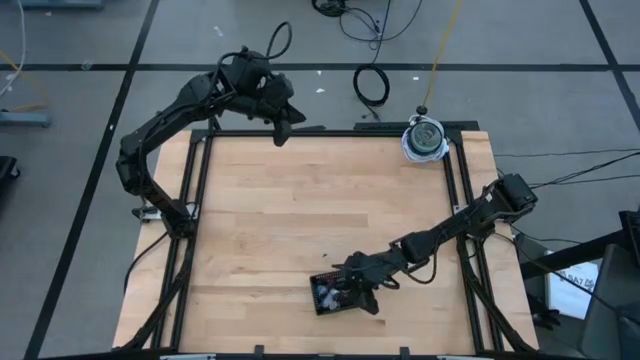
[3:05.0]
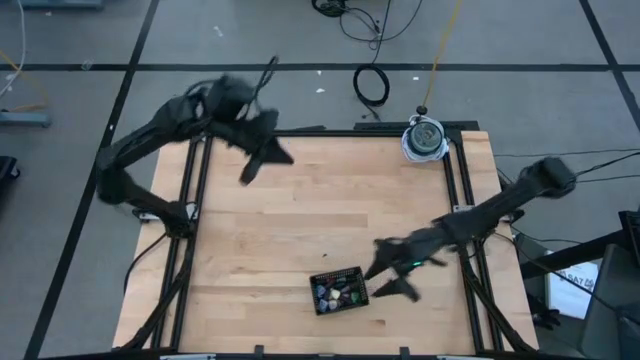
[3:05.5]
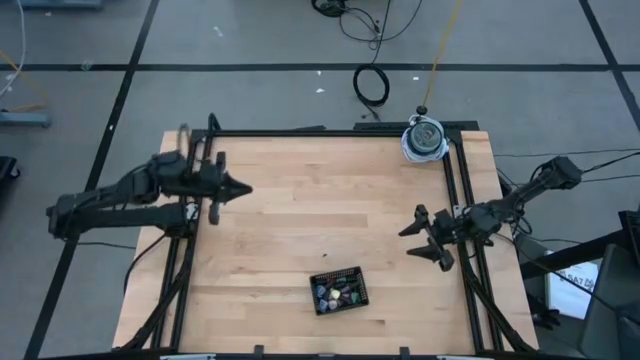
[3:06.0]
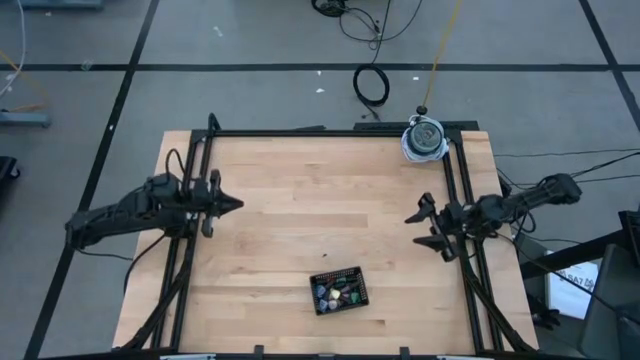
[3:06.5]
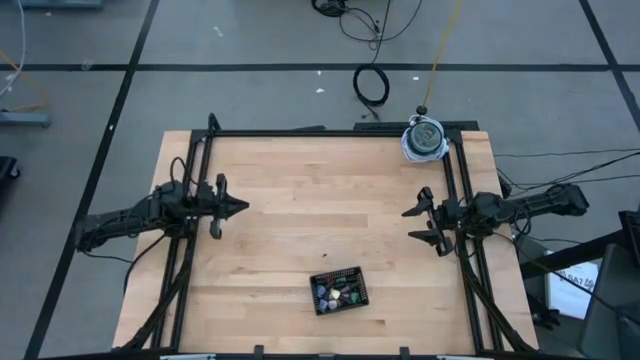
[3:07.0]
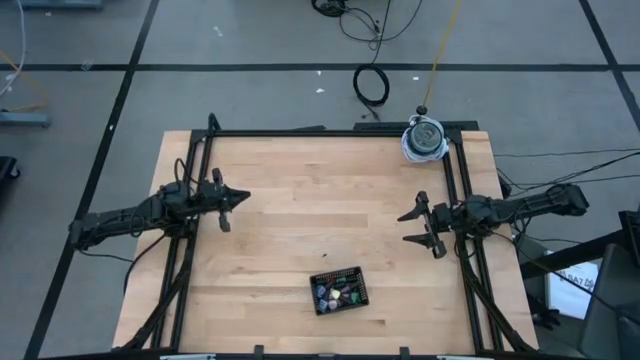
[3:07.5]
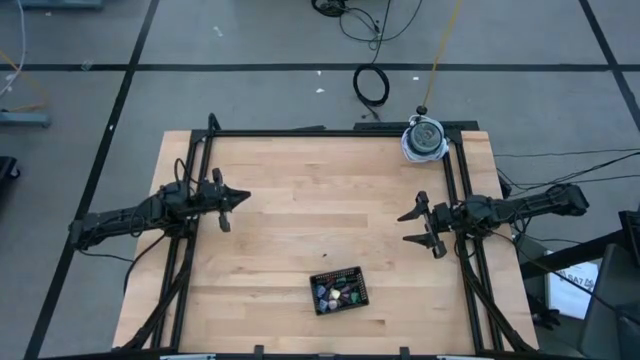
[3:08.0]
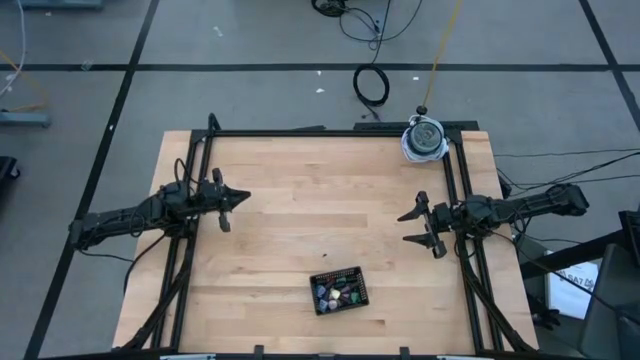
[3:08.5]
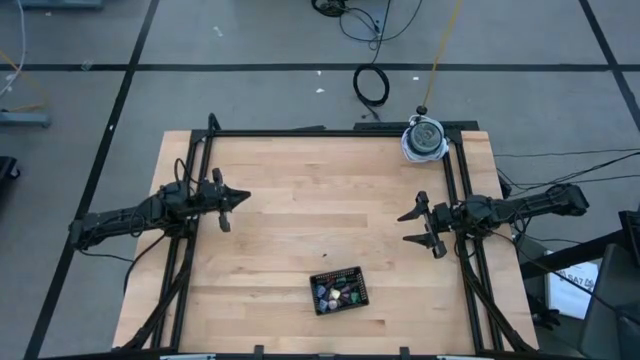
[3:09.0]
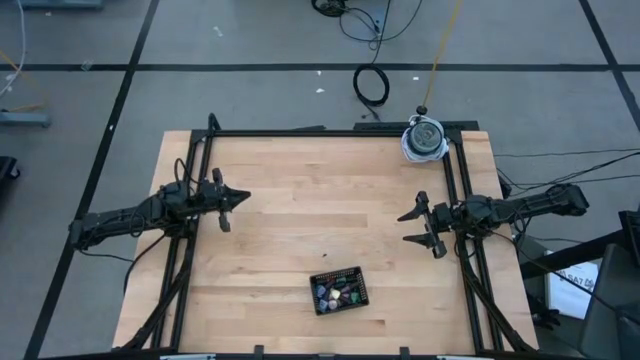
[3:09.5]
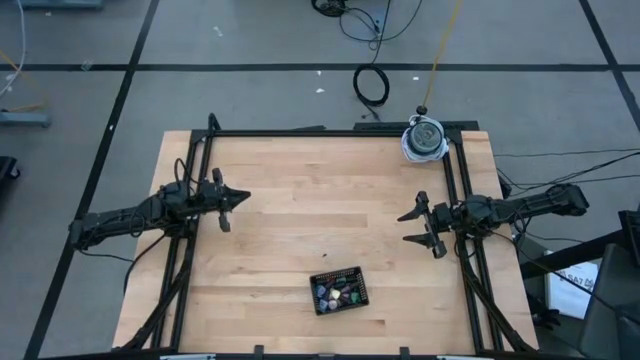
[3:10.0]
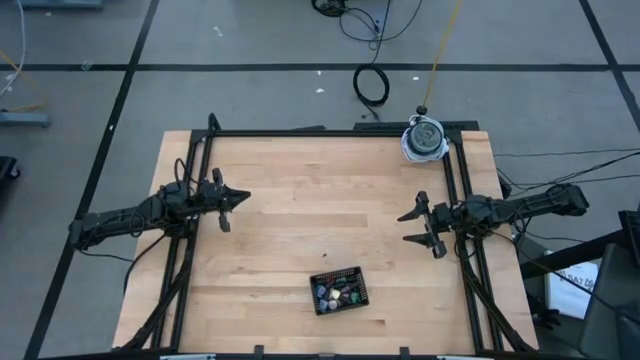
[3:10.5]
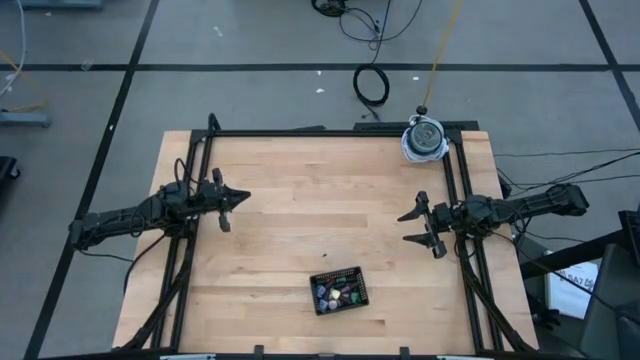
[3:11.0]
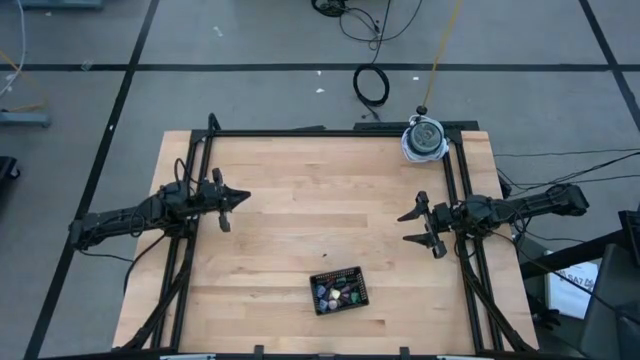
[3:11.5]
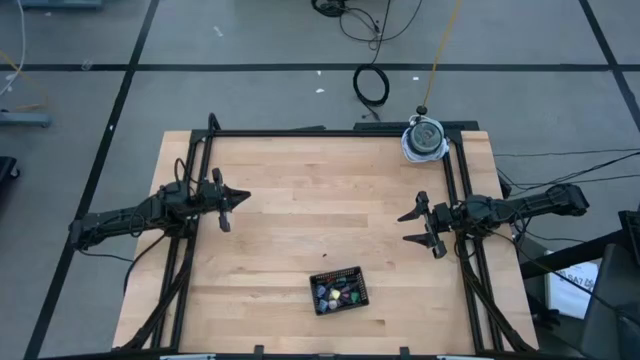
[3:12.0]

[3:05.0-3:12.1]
Task: Pick & Place Nail Polish
Return to Home Position

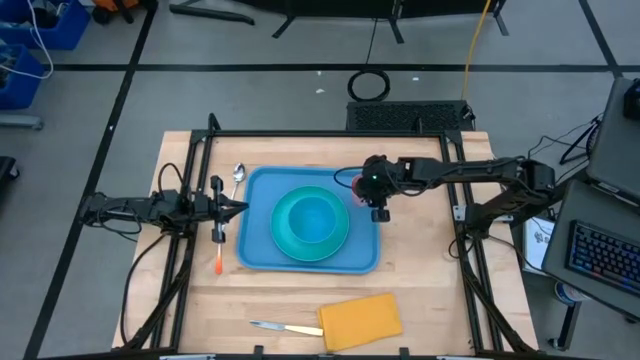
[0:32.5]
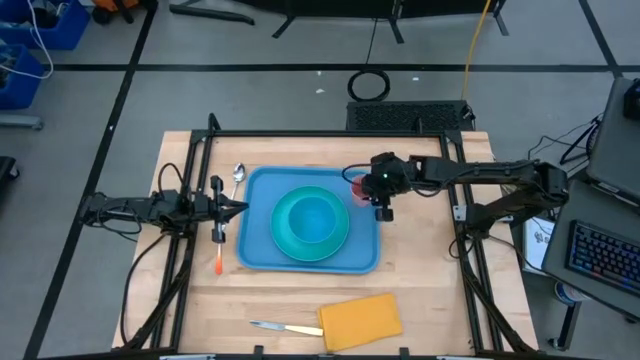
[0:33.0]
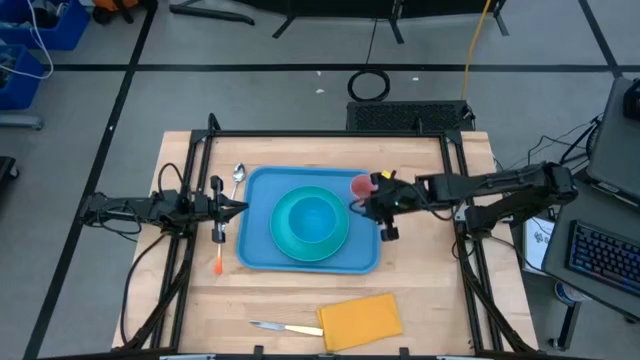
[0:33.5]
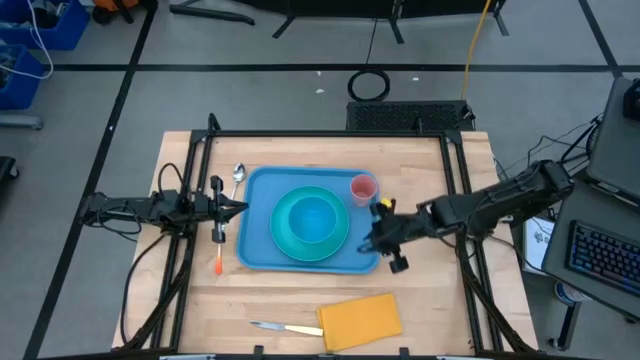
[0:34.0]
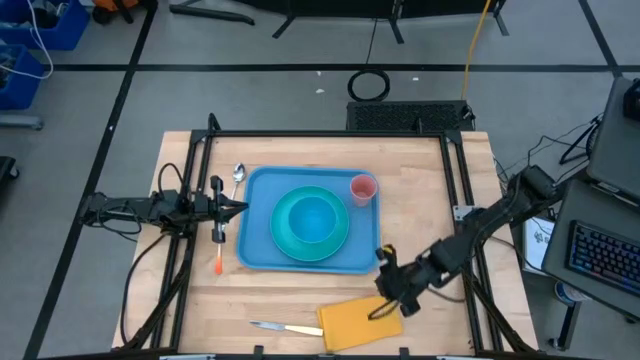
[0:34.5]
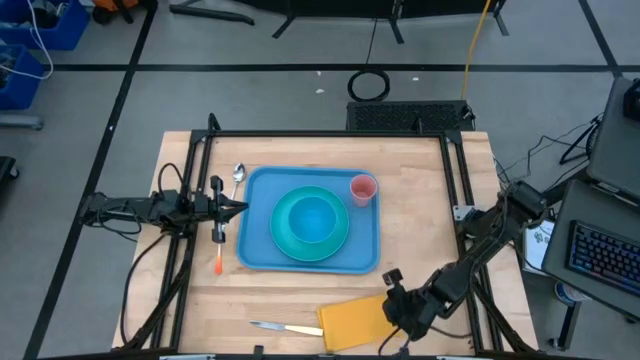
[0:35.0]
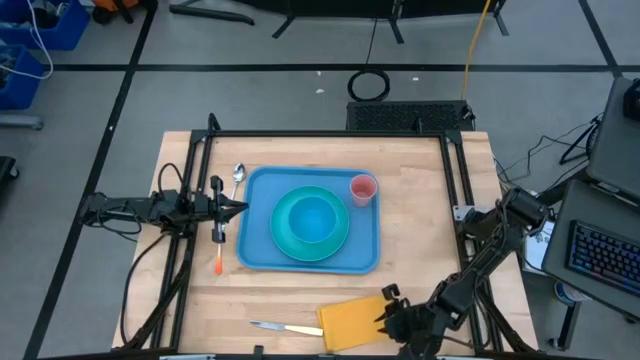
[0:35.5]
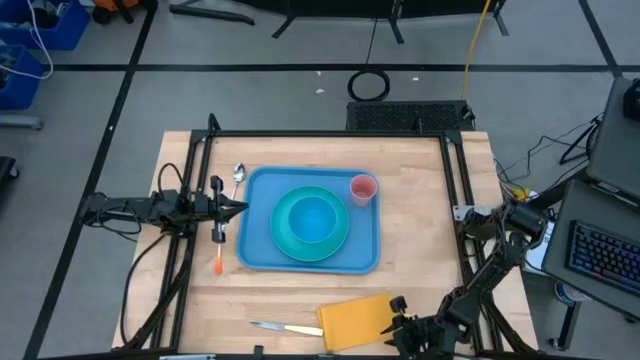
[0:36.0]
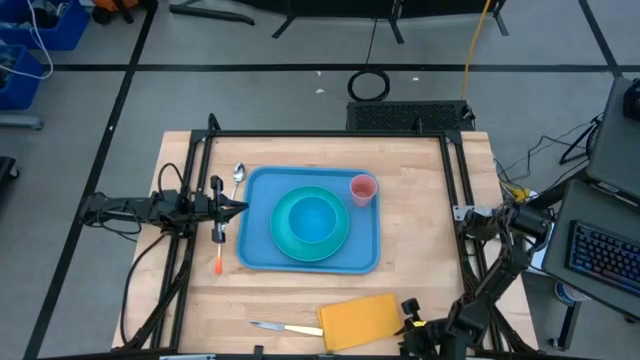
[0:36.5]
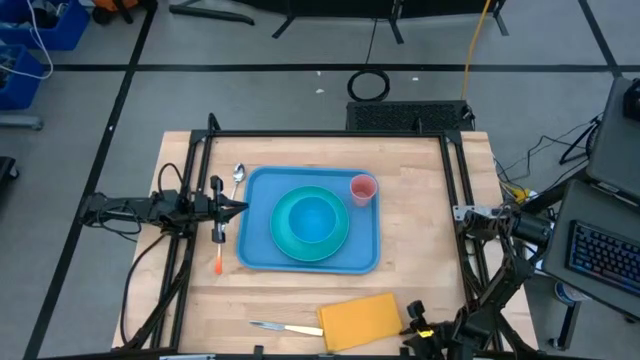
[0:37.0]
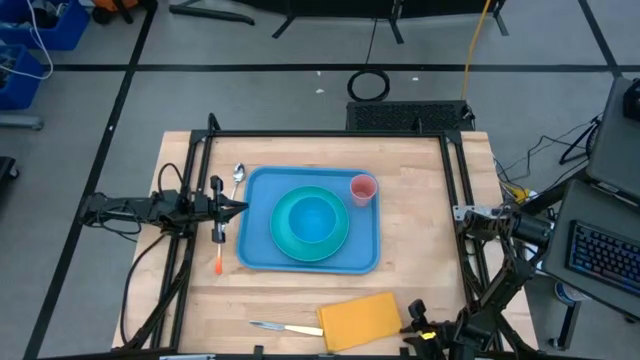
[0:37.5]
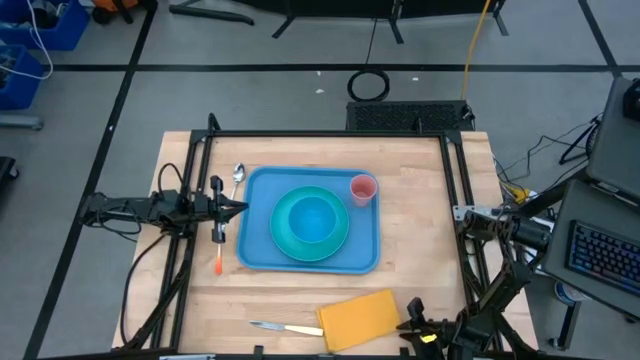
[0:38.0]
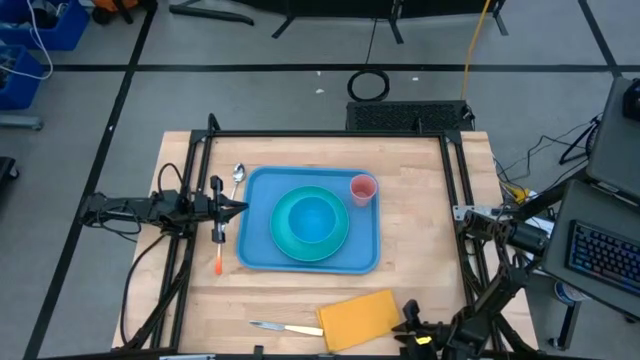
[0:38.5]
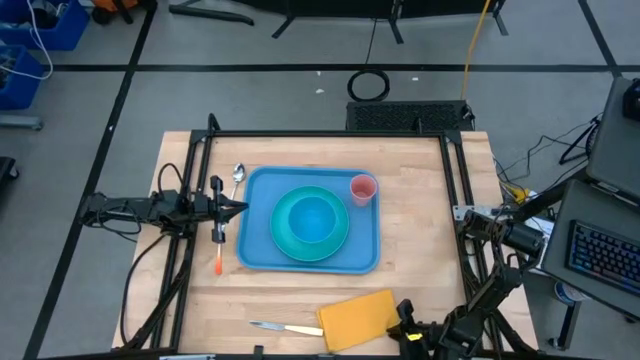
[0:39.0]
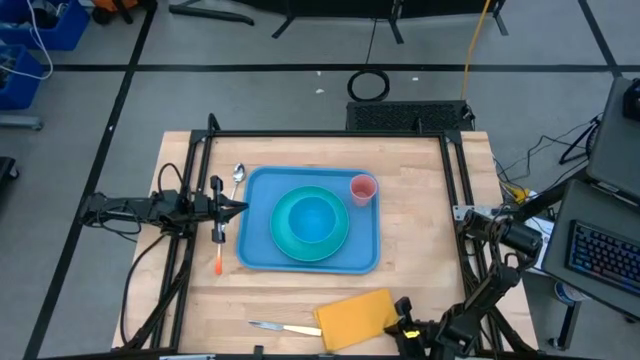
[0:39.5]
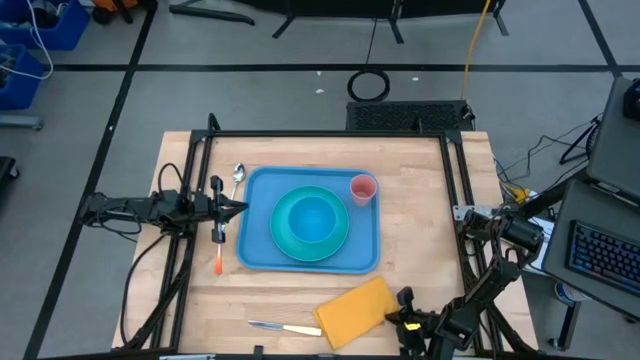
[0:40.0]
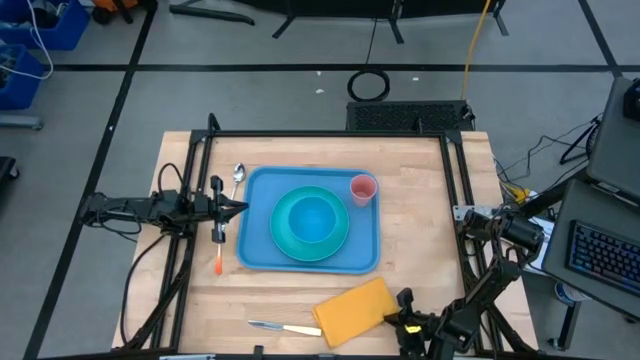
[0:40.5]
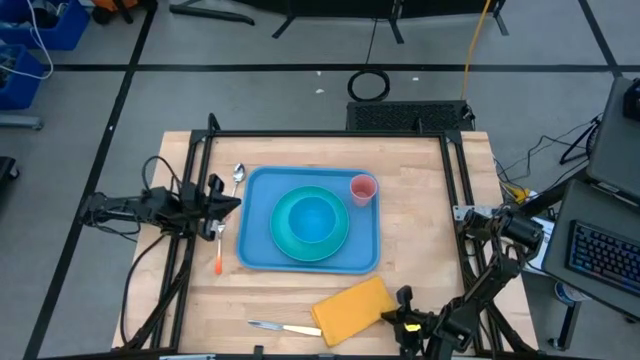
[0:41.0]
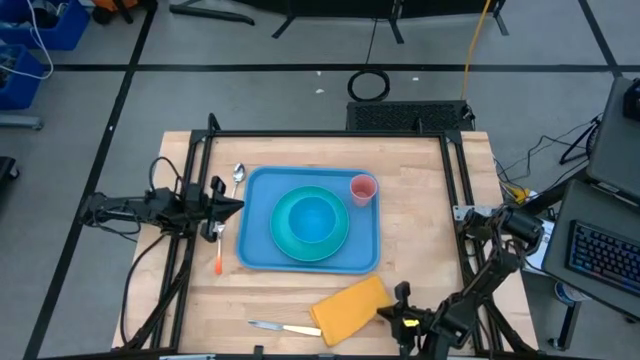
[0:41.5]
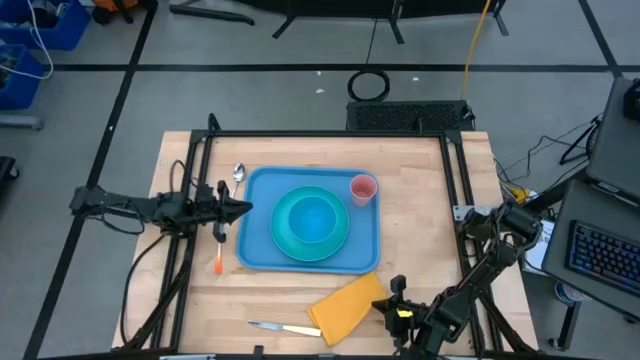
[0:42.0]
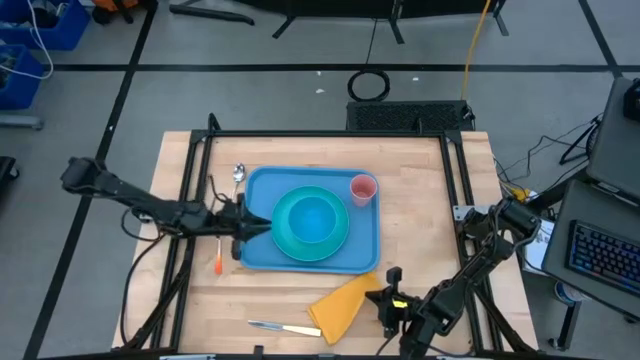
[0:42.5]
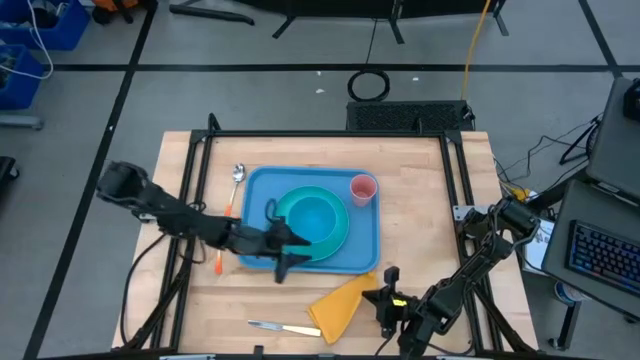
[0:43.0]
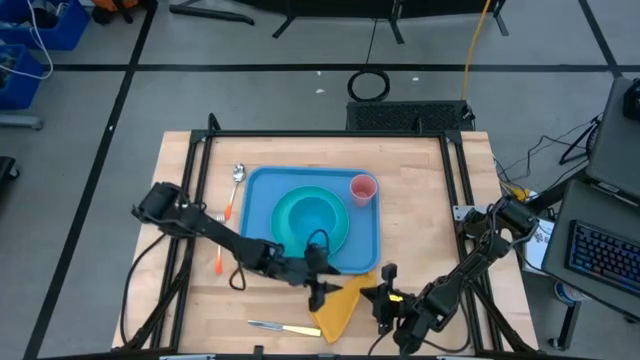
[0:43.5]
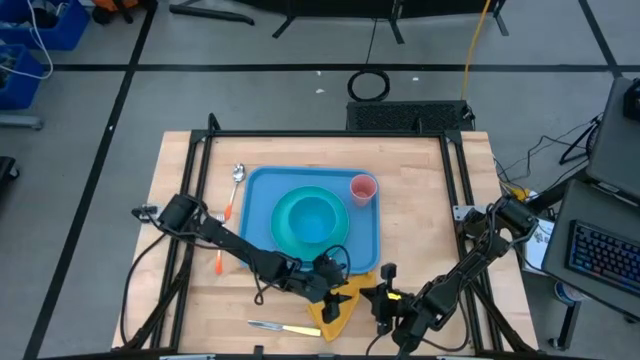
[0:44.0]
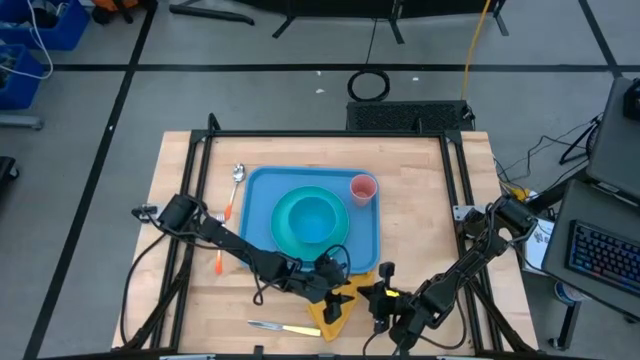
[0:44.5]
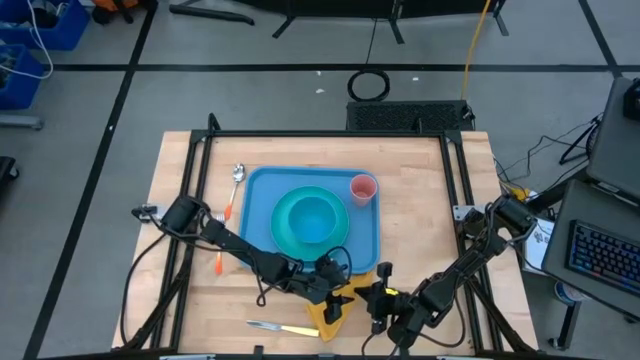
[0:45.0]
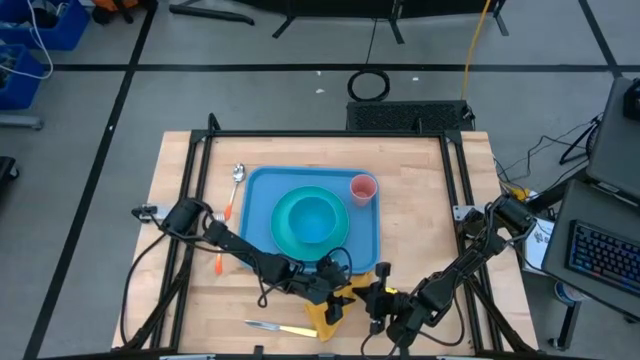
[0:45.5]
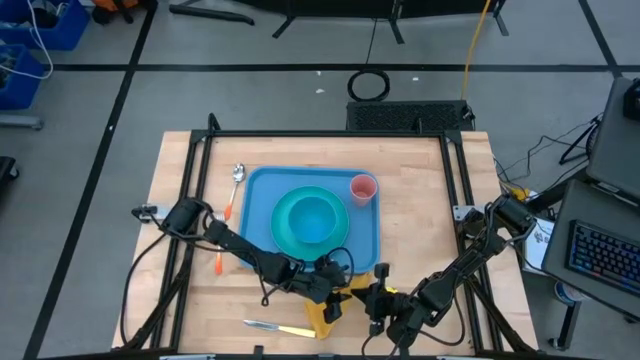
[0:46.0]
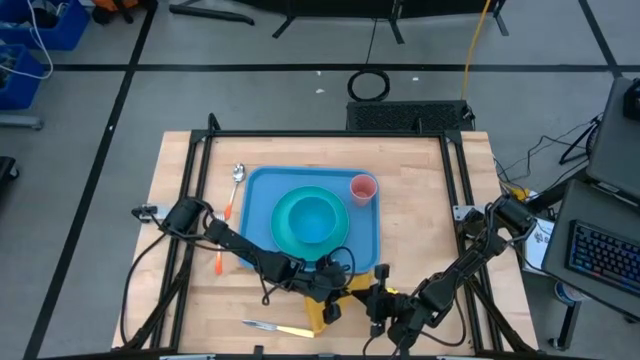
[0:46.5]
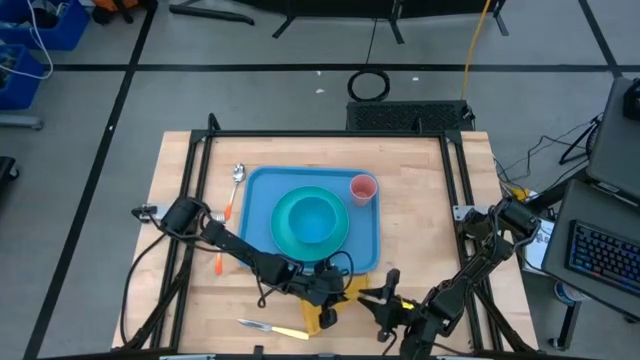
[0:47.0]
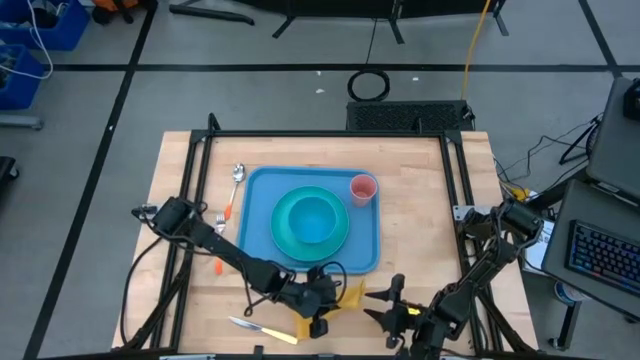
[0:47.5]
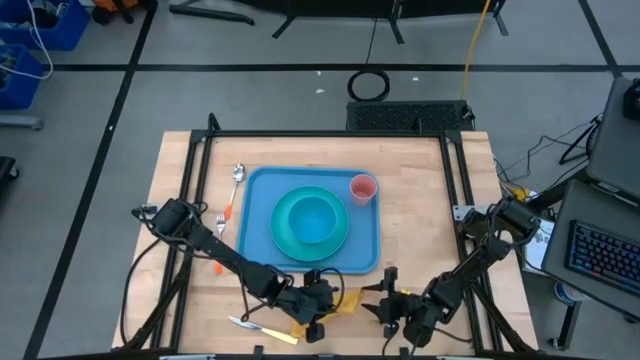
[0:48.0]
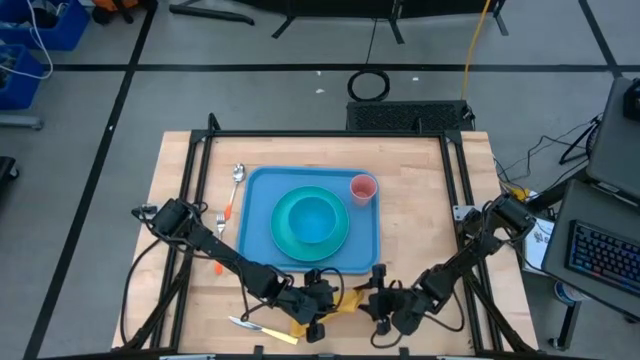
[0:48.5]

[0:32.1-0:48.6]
Task: Set up tray
Put the yellow napkin on the blue serving tray to the left of the blue plate
